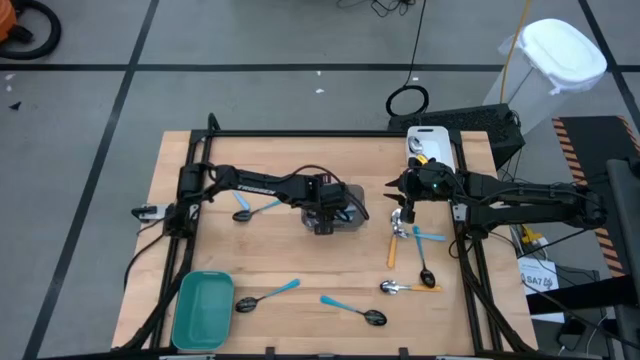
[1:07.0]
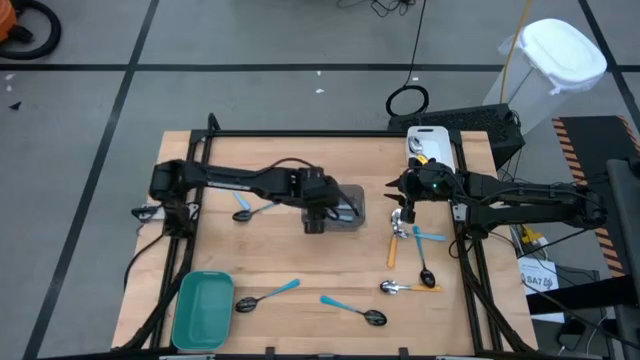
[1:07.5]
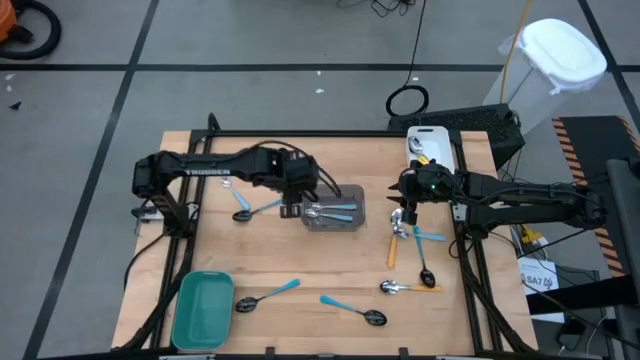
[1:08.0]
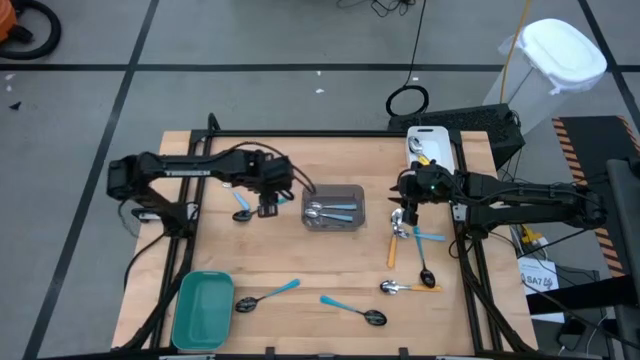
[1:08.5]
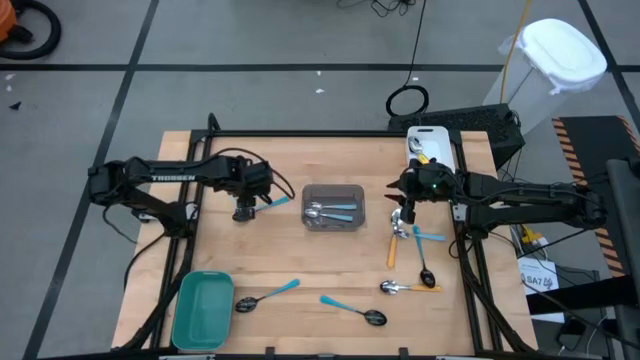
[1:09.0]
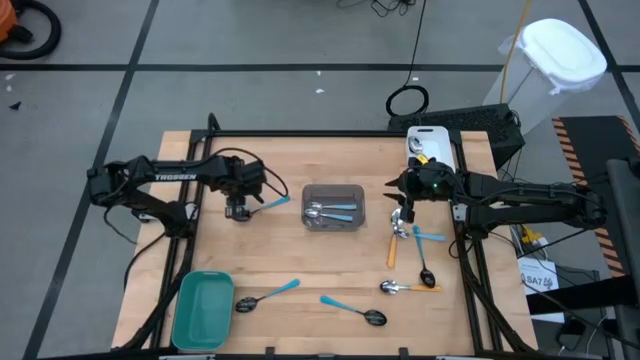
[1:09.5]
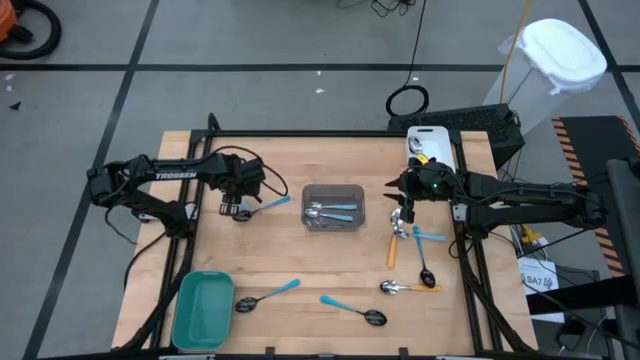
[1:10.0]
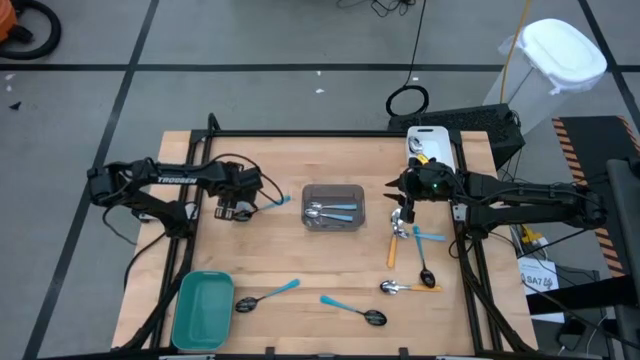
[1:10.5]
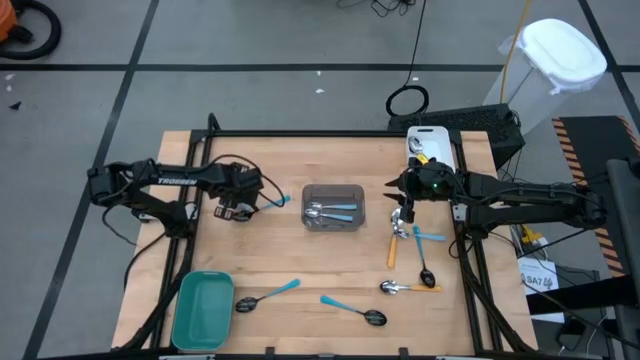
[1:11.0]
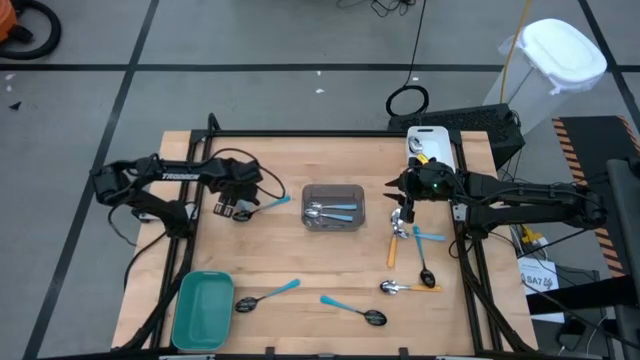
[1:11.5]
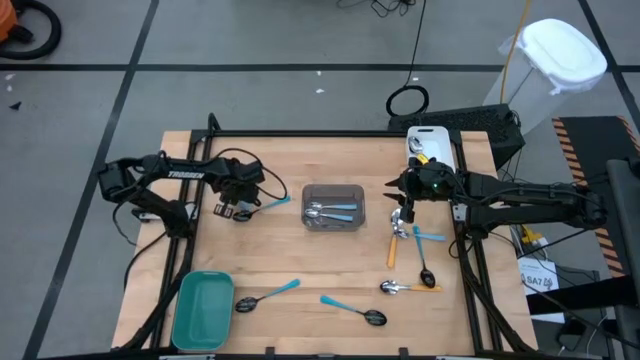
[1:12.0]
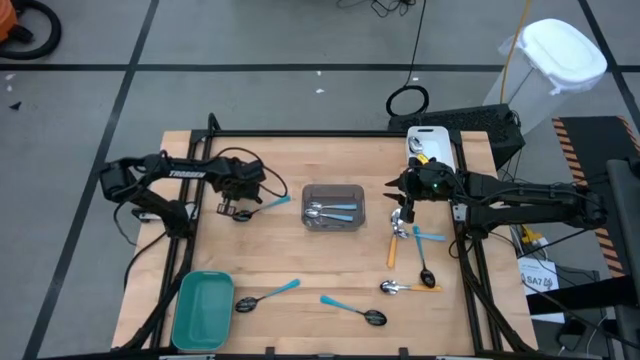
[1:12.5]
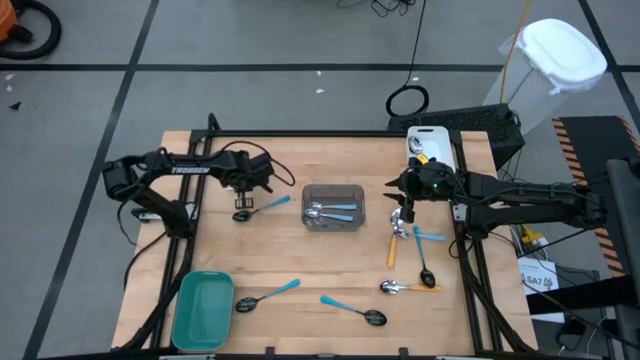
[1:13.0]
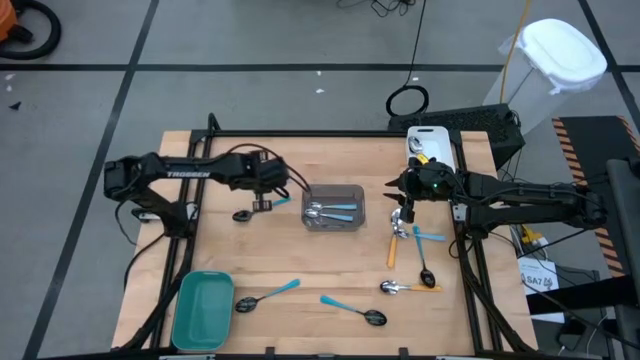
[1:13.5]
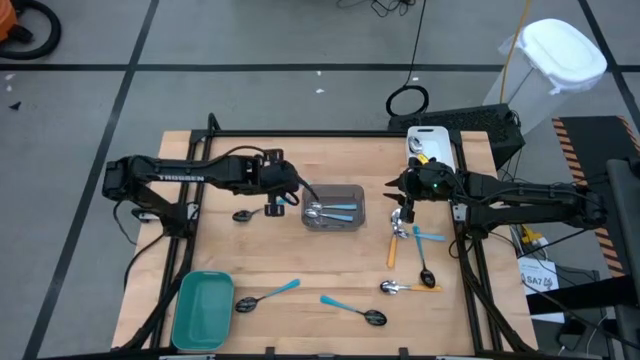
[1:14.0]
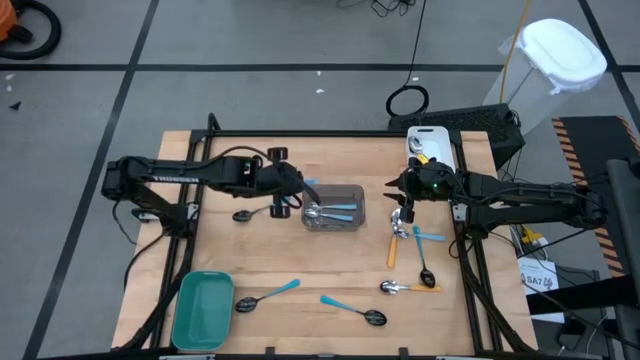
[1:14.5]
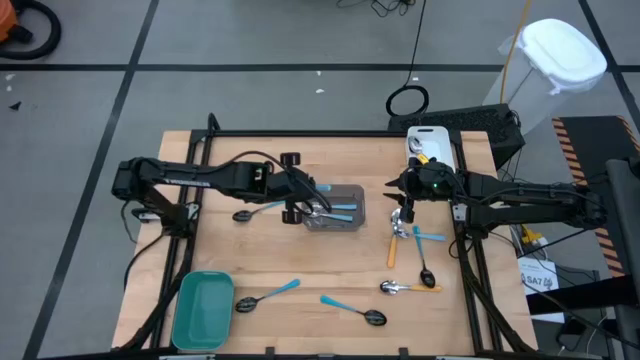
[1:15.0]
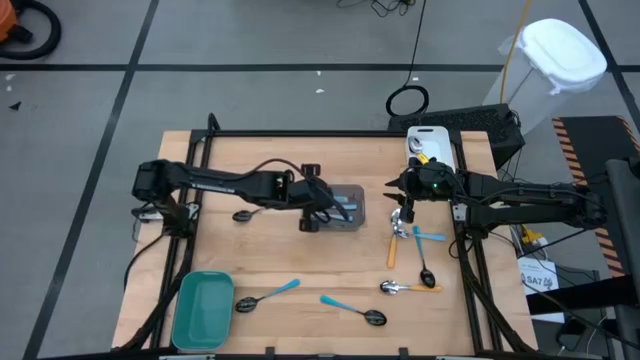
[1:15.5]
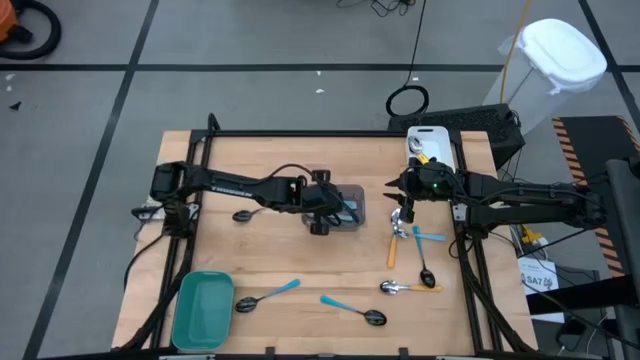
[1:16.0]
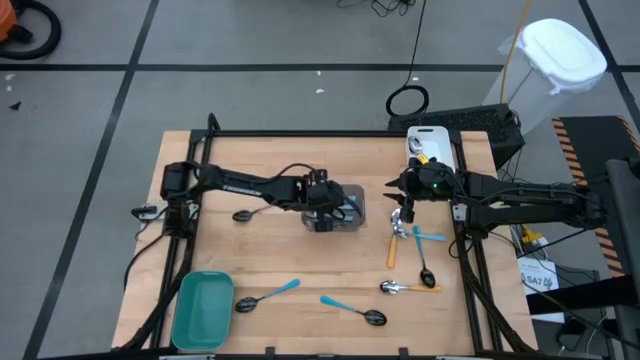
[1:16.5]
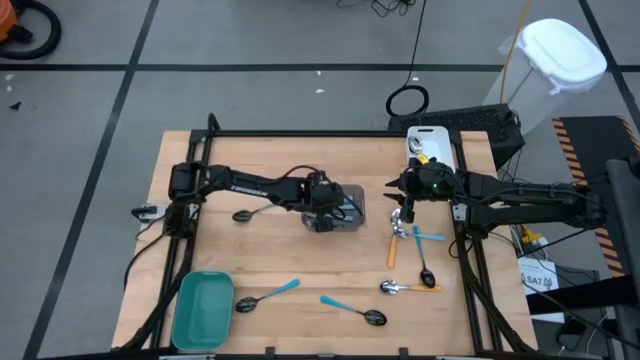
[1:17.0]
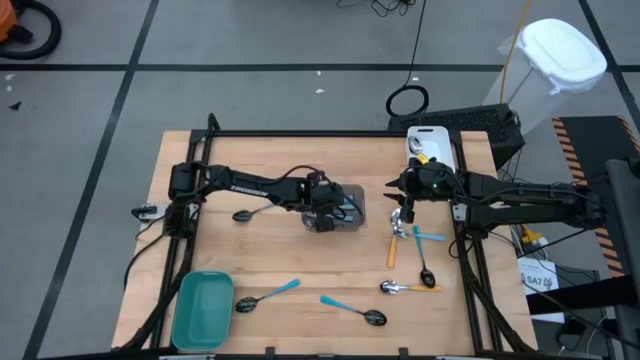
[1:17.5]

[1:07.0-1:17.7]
Task: Sort silverware by color (type)
Put the left light blue spoon into the black bin

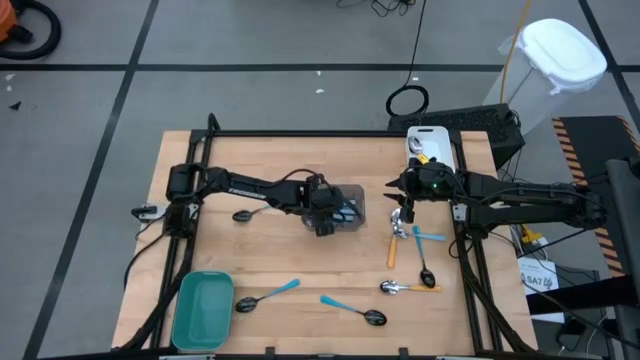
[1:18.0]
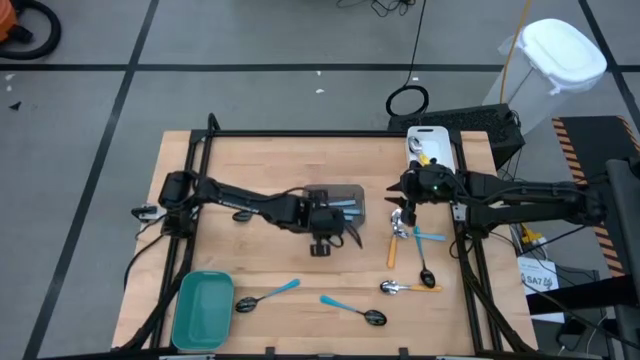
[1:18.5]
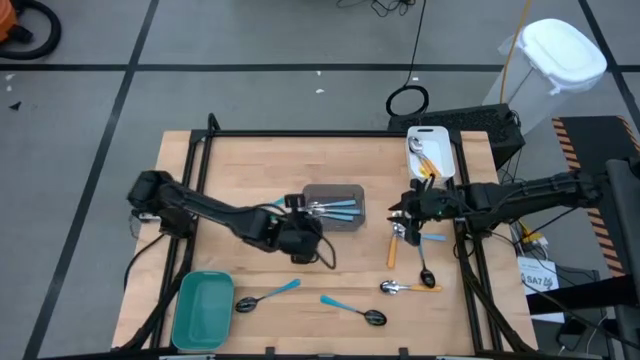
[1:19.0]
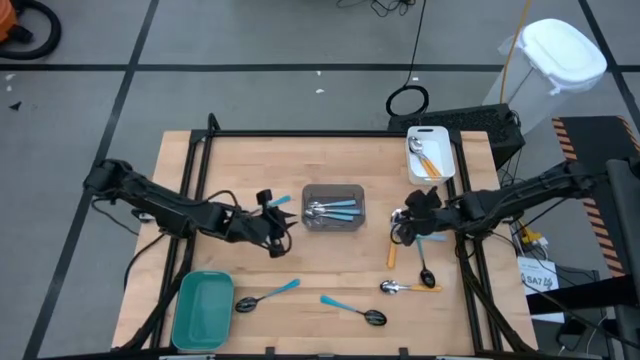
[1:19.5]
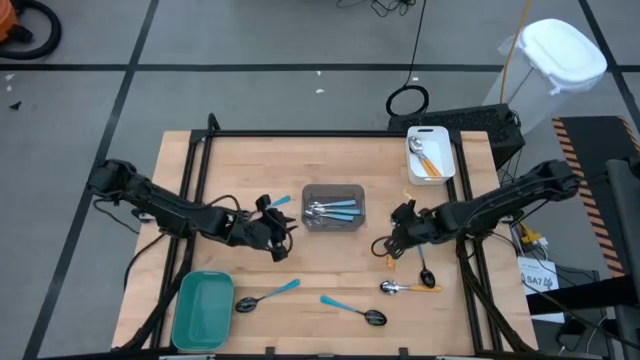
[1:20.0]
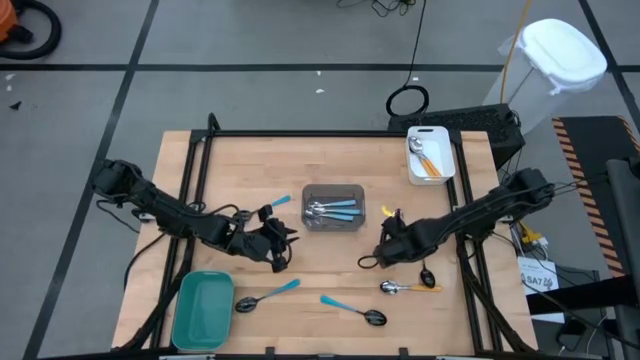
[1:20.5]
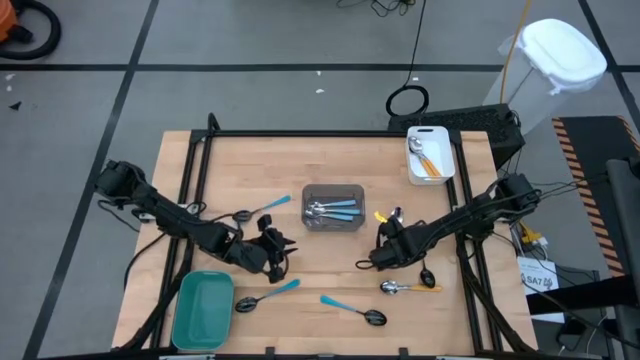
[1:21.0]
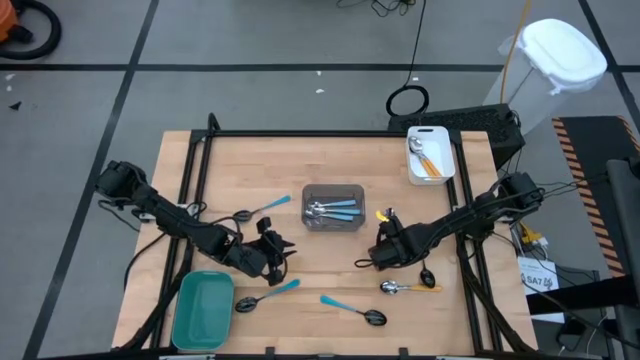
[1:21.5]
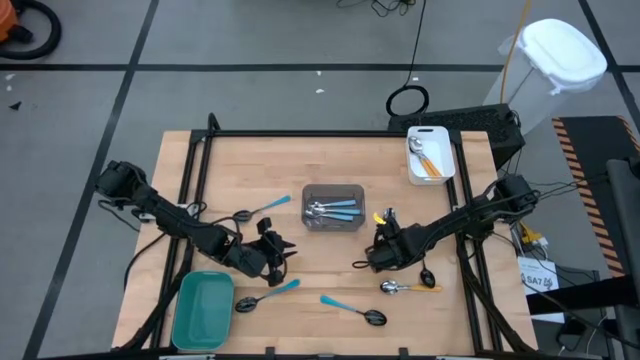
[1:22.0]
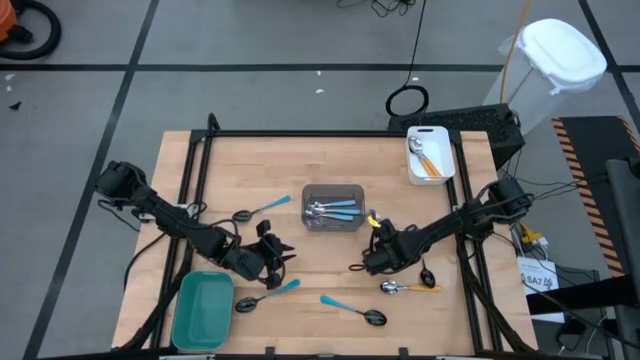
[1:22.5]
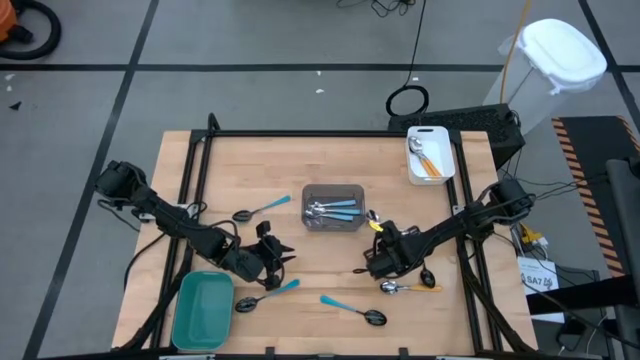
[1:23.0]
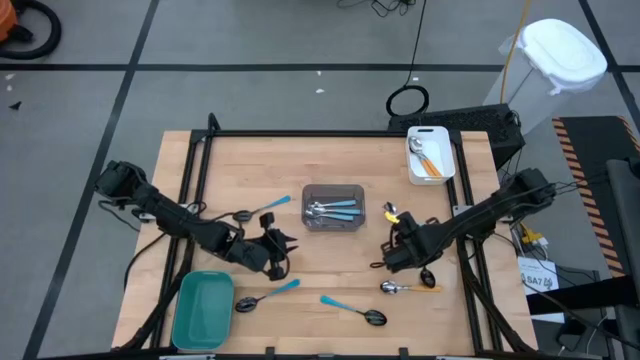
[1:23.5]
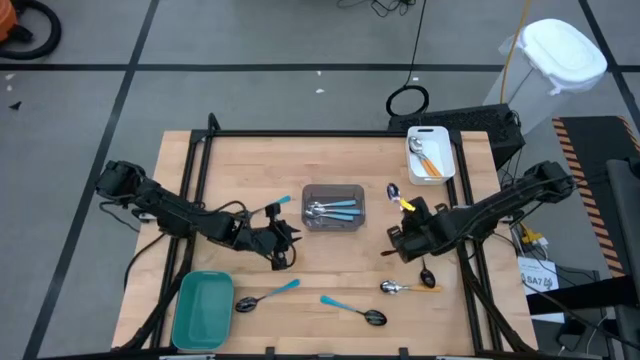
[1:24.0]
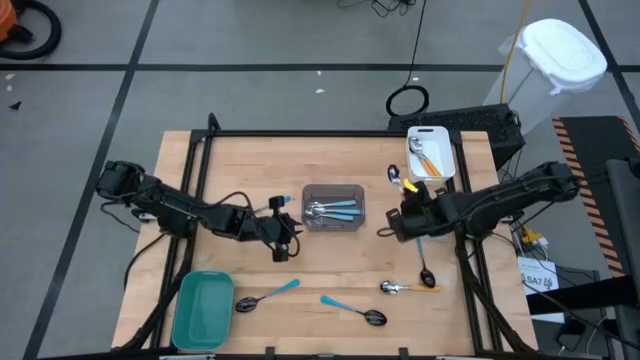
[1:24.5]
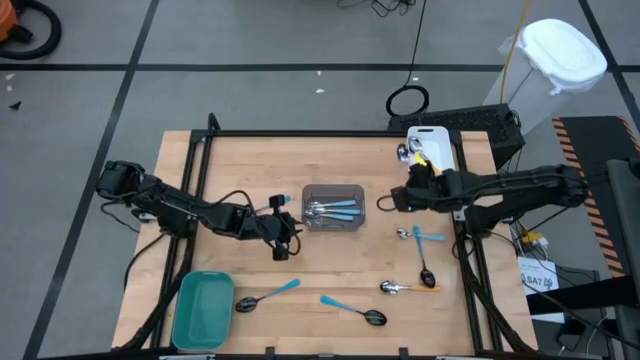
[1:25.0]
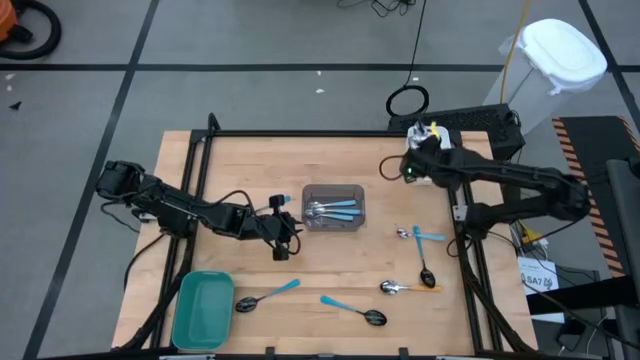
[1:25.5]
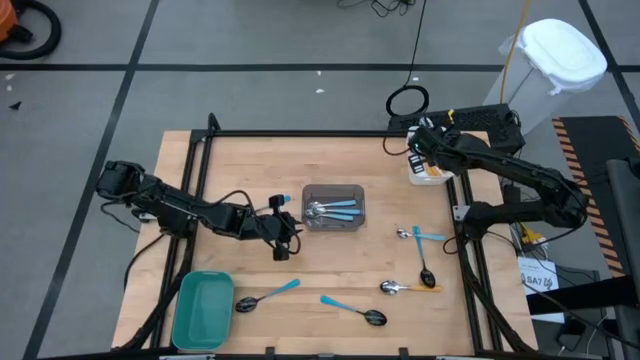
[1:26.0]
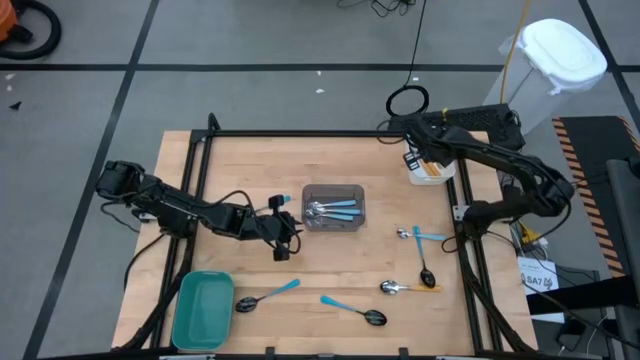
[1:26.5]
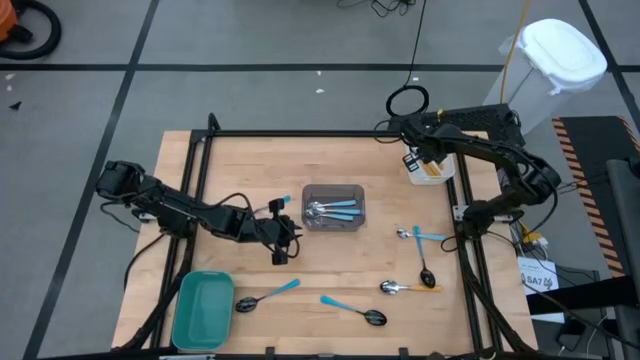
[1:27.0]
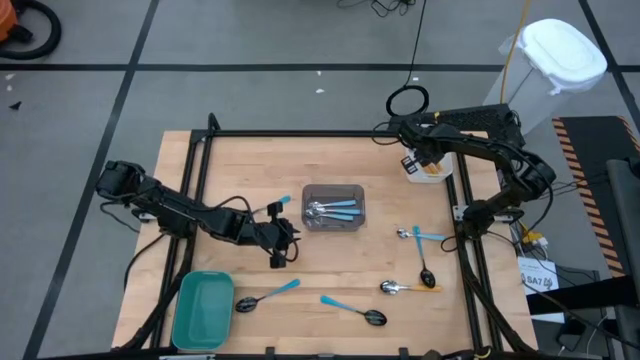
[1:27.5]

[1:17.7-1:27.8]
Put the top yellow spoon into the white bin
